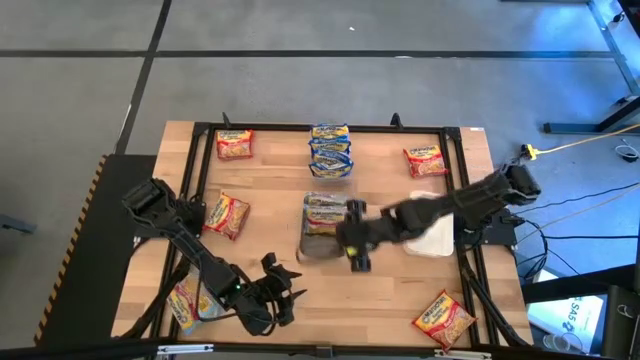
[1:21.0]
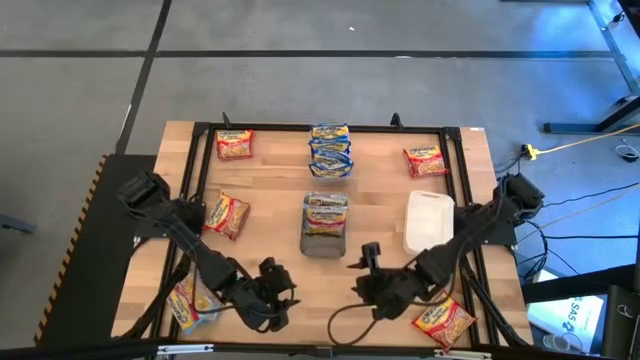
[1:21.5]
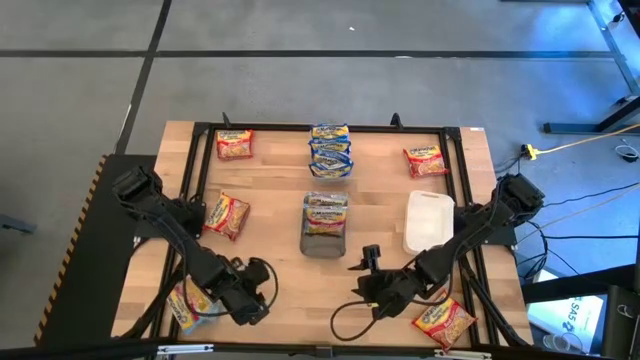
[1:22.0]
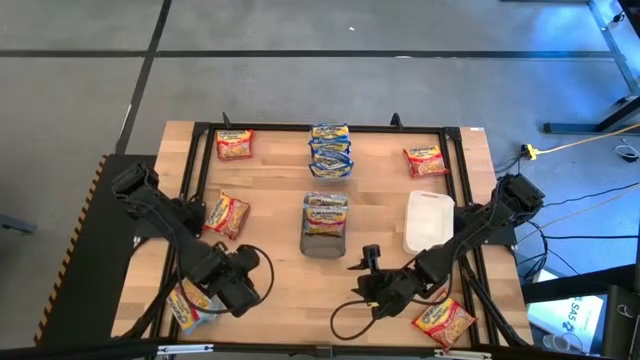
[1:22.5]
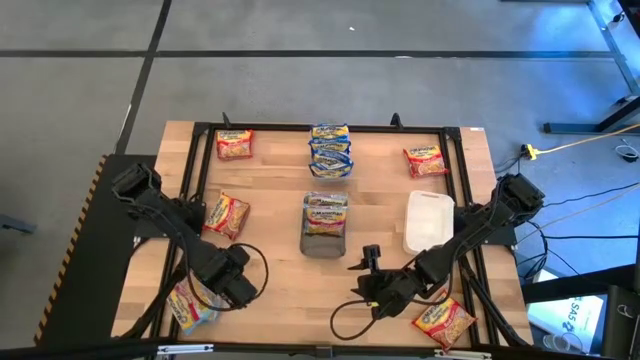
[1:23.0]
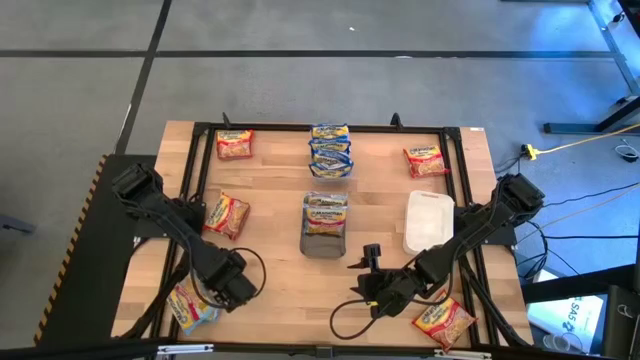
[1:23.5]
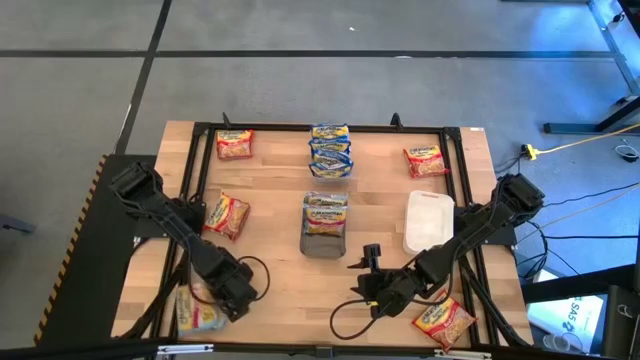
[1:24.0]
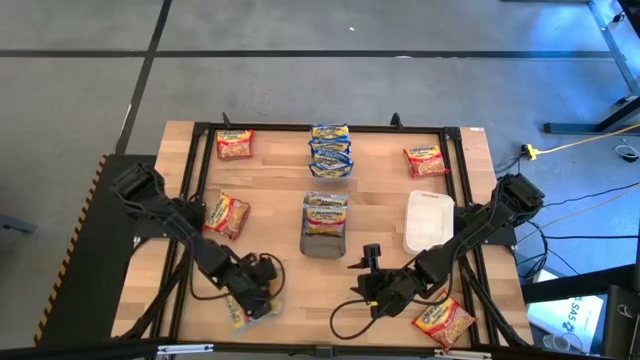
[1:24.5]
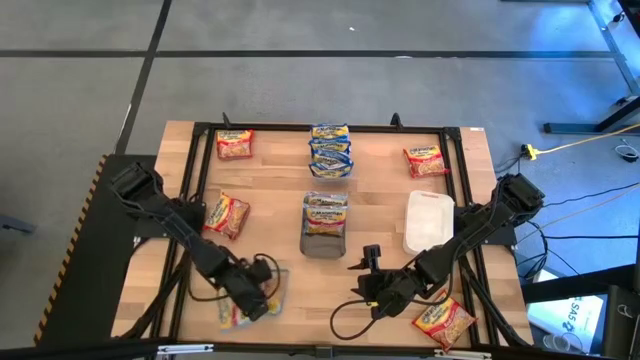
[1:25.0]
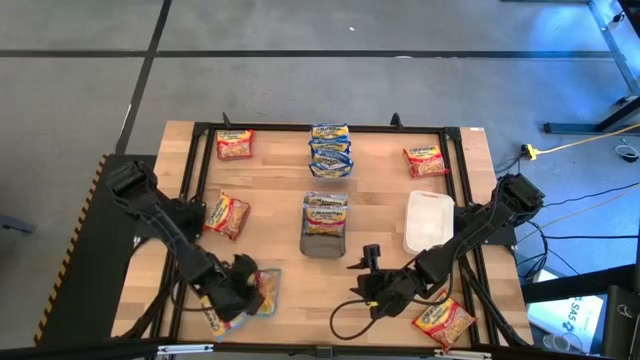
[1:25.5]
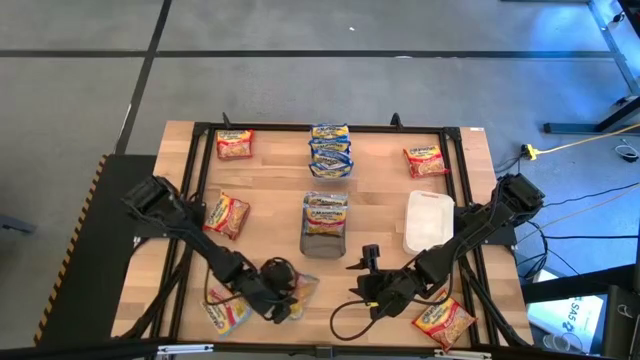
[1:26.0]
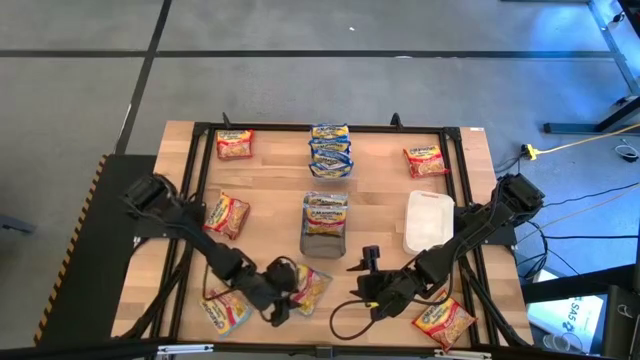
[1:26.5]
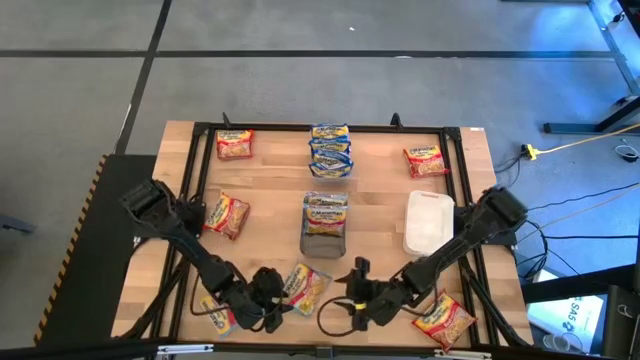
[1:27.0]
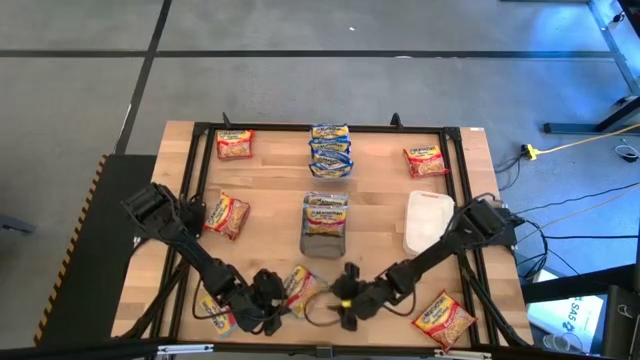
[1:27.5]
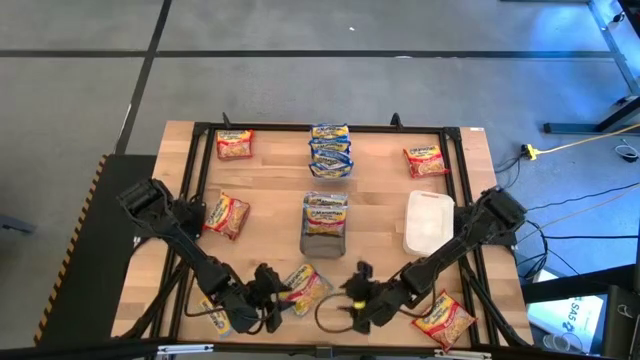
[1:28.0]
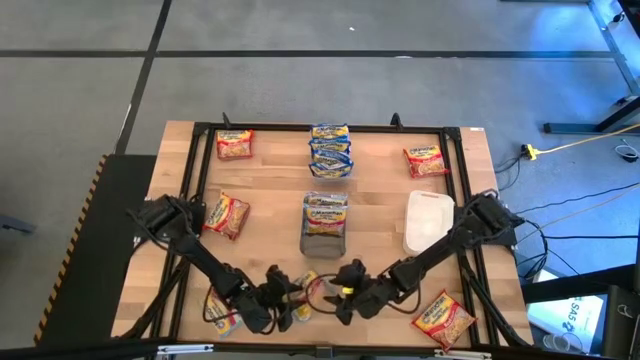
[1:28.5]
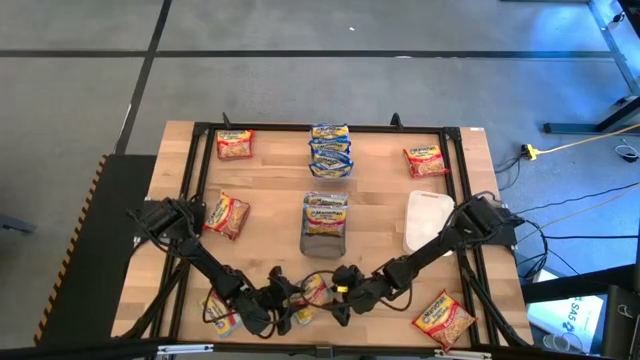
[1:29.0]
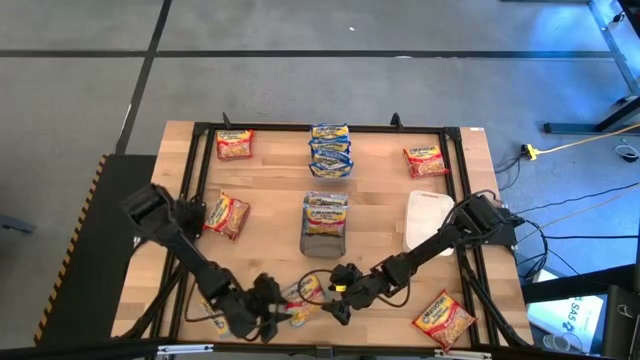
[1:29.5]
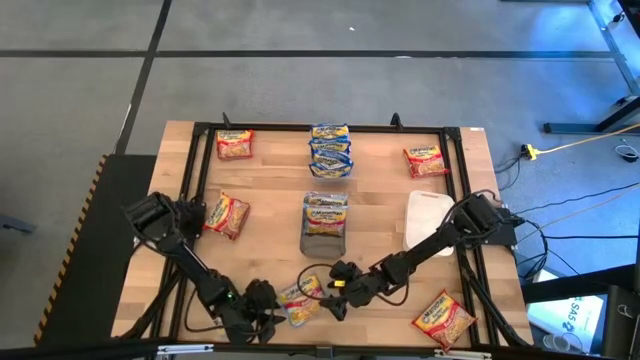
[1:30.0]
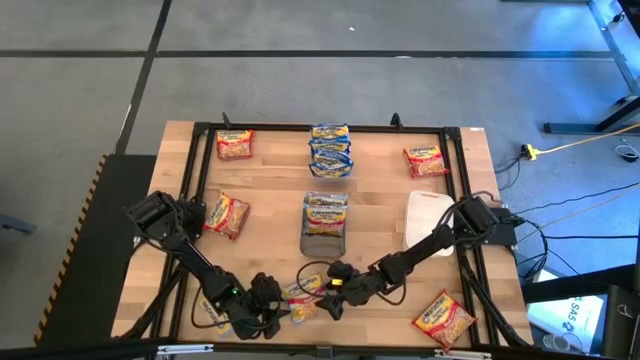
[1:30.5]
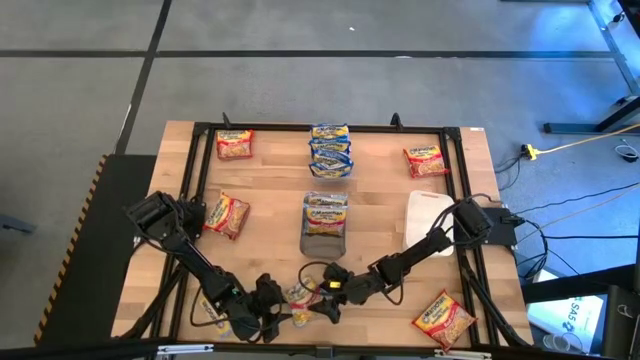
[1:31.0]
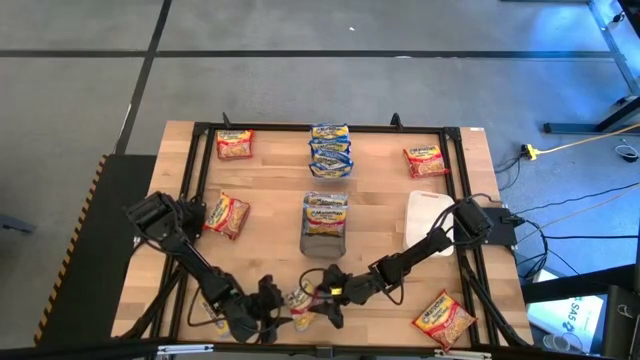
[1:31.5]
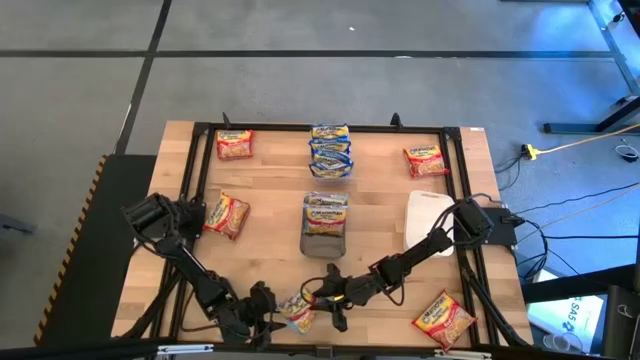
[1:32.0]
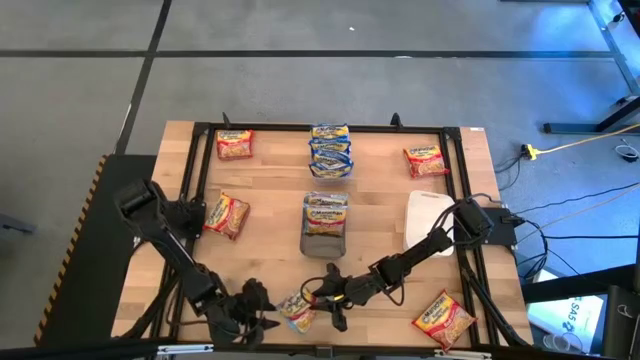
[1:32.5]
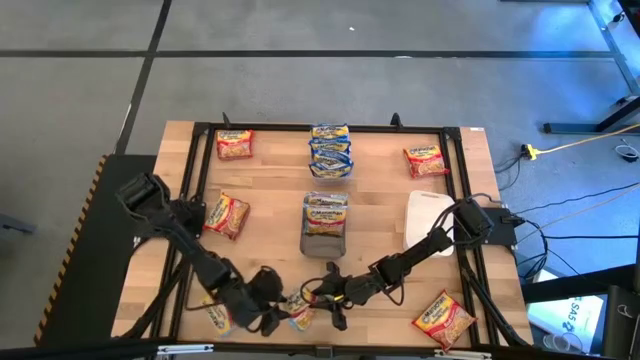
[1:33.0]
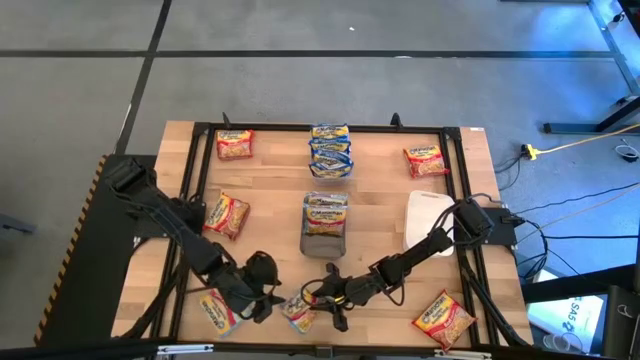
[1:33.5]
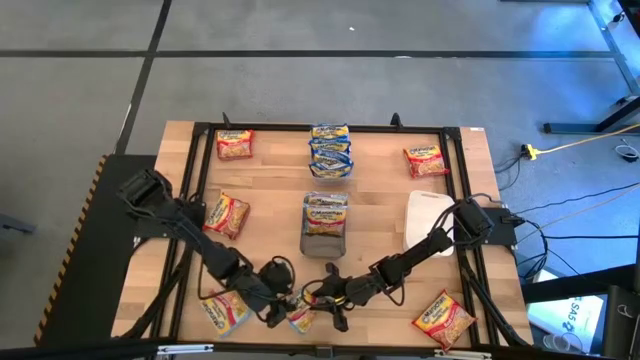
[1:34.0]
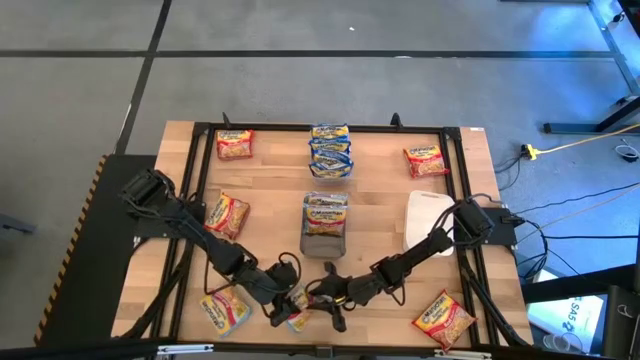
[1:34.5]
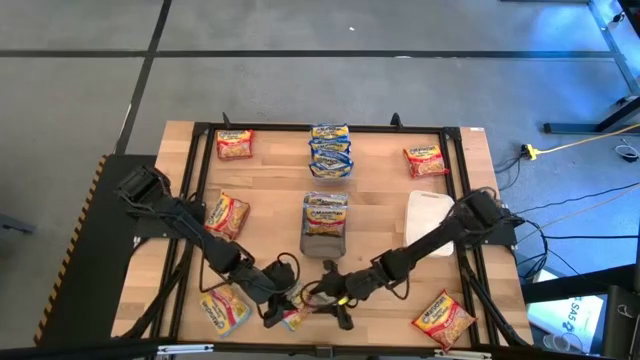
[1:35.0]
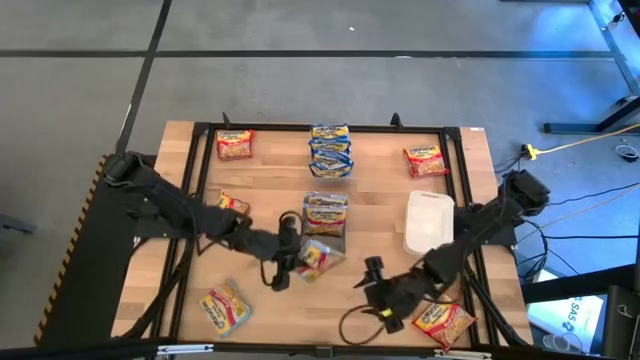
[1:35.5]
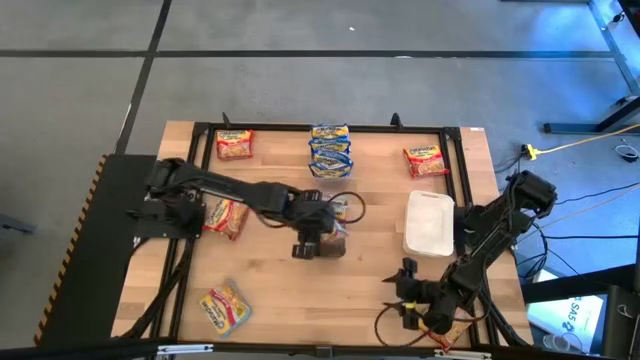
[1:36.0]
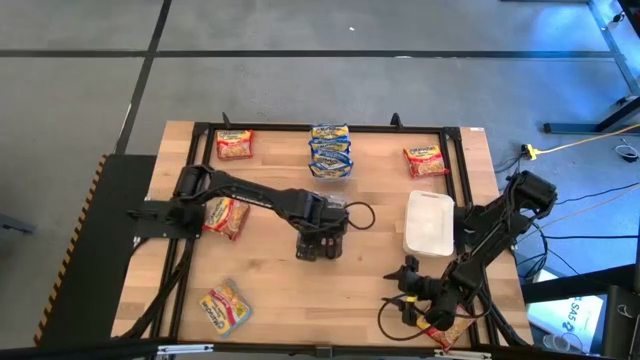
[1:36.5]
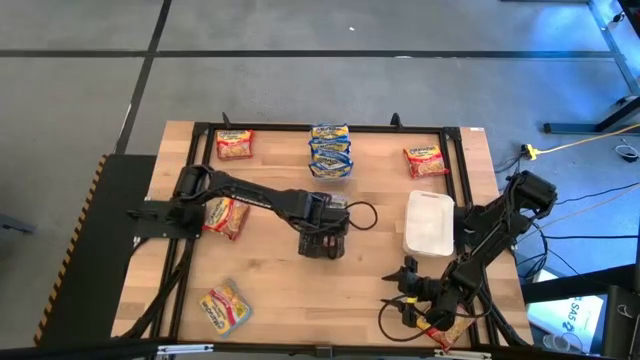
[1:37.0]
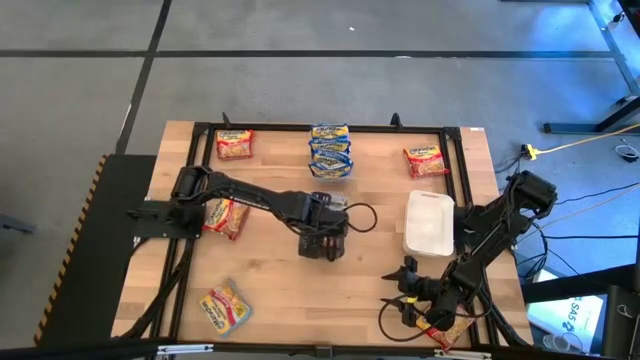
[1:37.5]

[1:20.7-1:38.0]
Task: Sort Maruchan noodles
Put the light blue noodle pack into the black bin

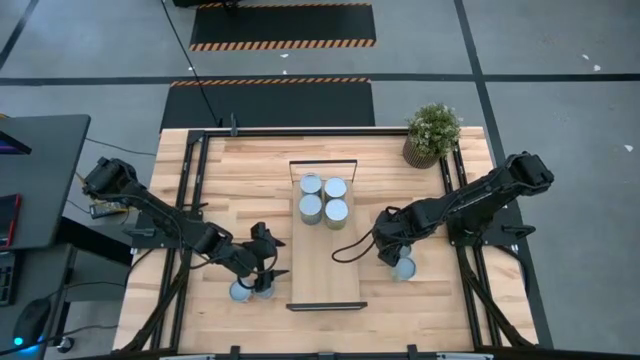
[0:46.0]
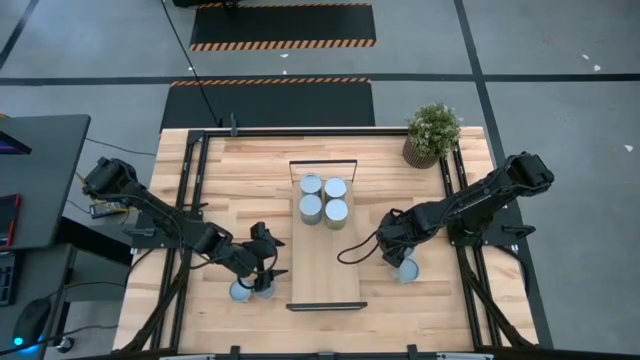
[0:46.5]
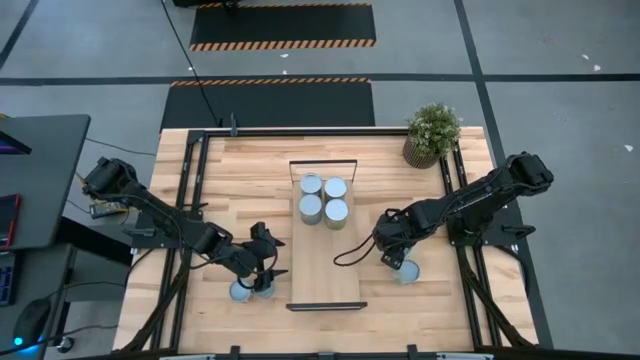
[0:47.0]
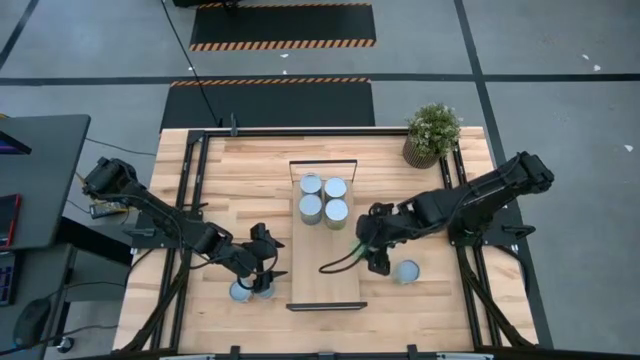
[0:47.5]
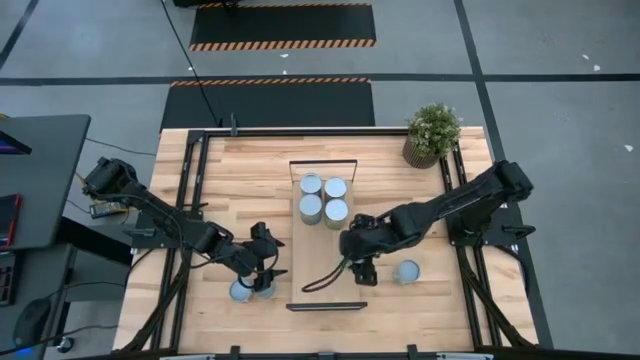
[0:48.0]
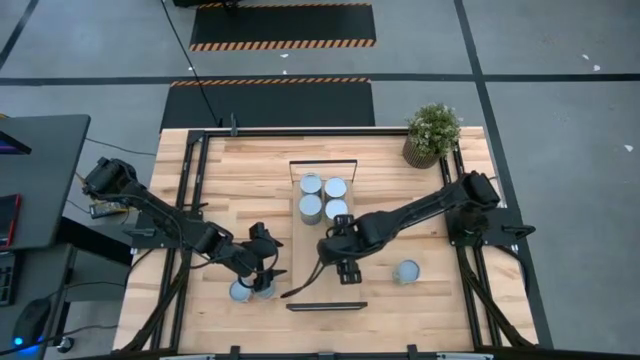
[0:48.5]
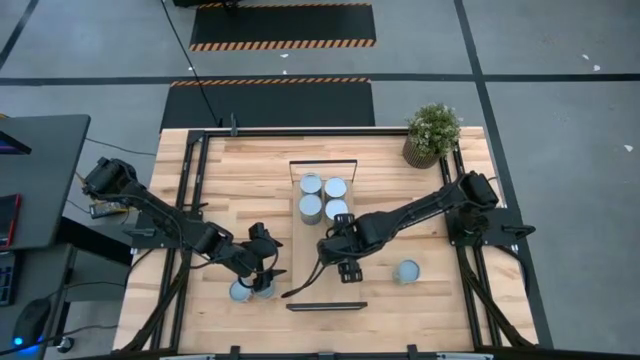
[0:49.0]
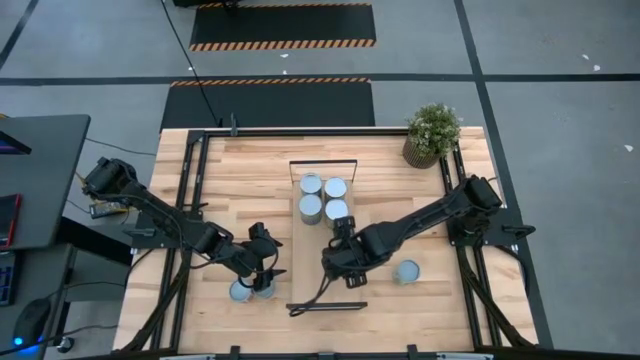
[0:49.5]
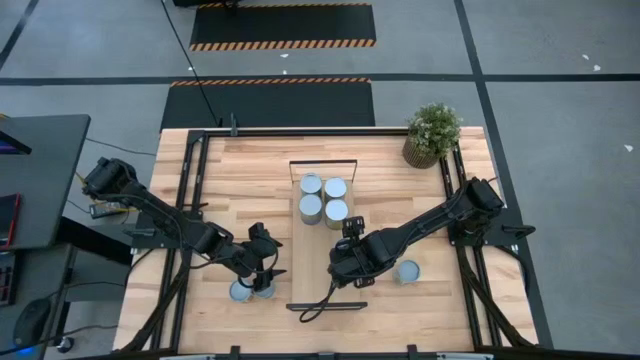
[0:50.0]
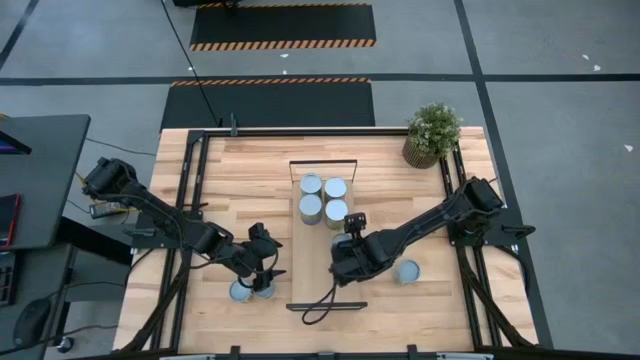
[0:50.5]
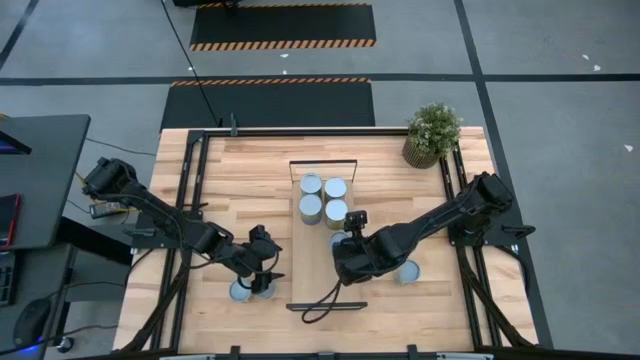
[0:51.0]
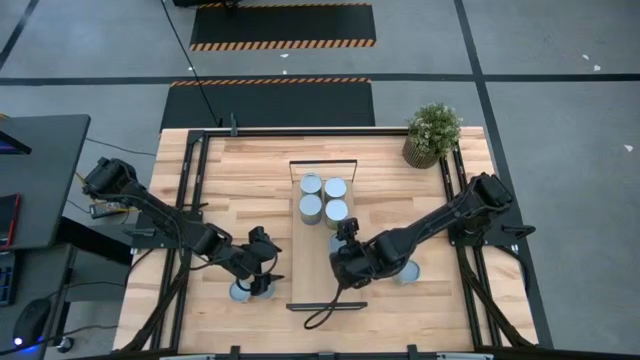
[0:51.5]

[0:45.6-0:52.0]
Task: Pick and place cans onto a shelf
Put the canned green peas on the shelf
